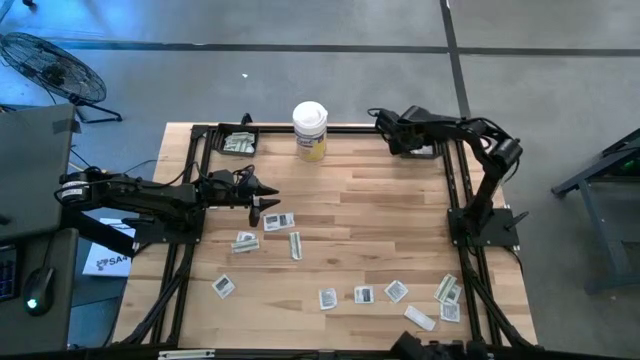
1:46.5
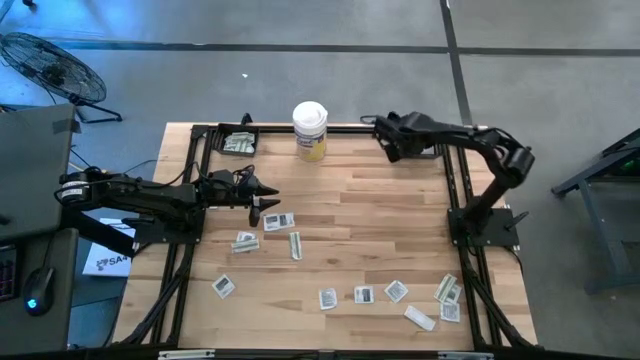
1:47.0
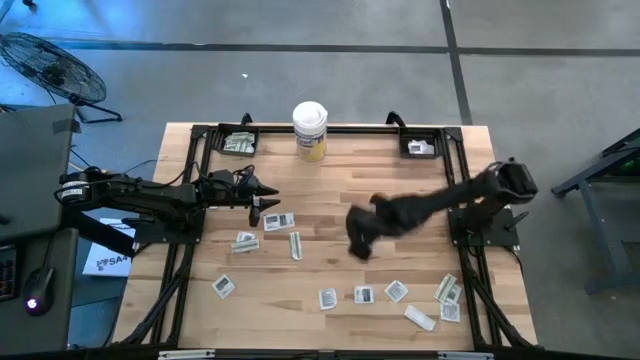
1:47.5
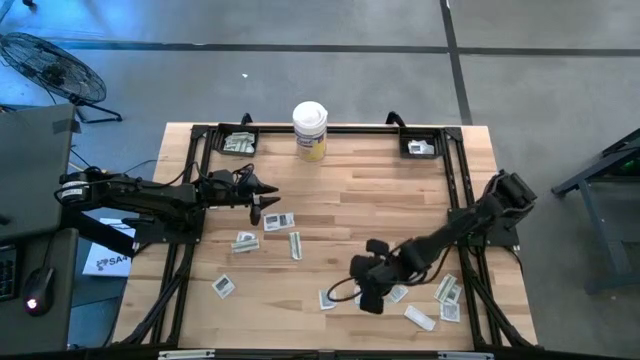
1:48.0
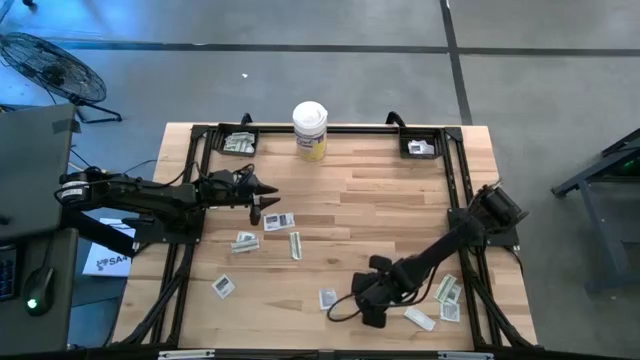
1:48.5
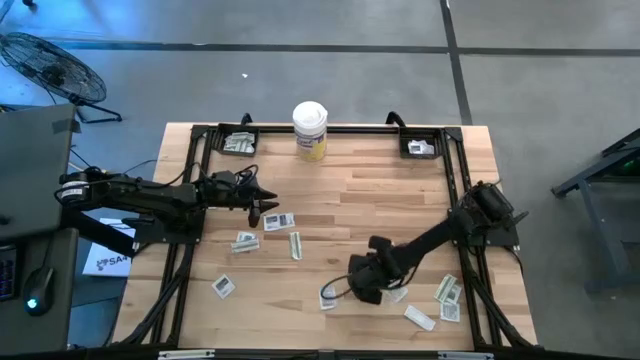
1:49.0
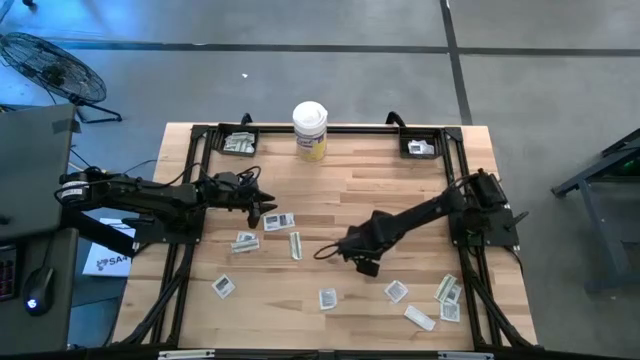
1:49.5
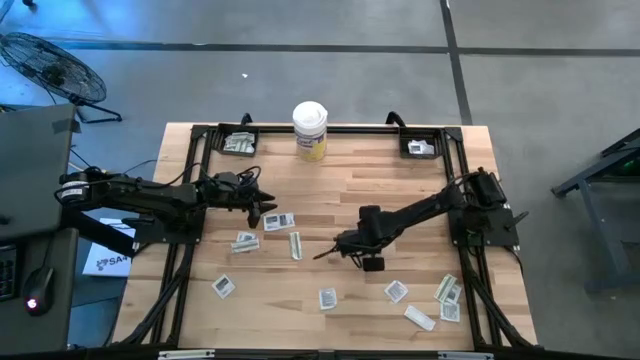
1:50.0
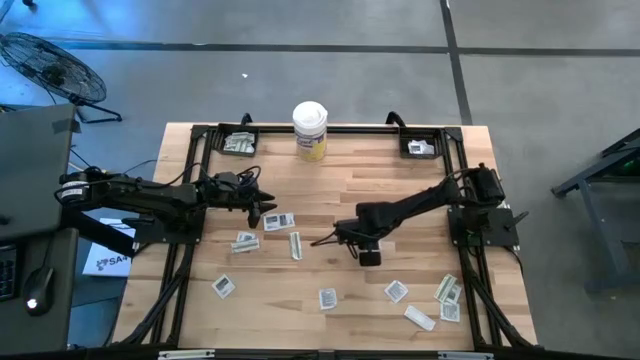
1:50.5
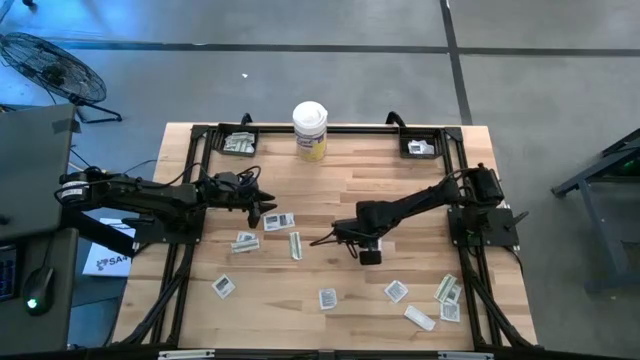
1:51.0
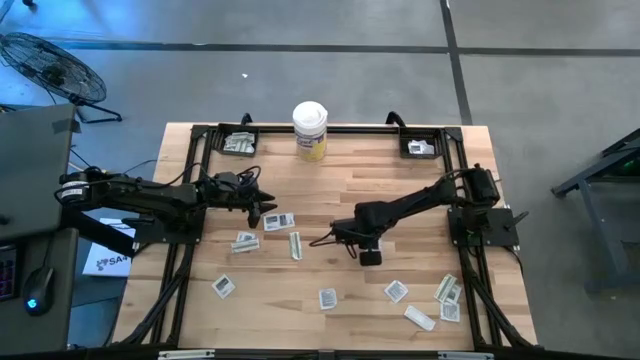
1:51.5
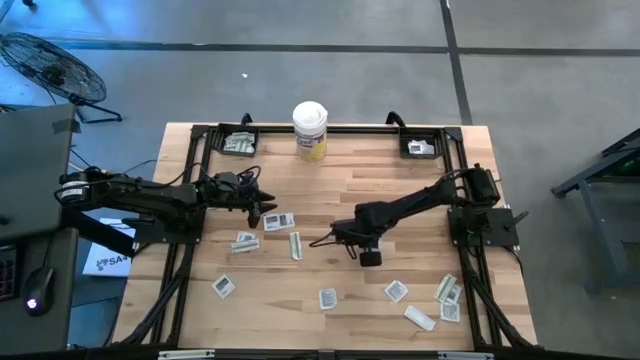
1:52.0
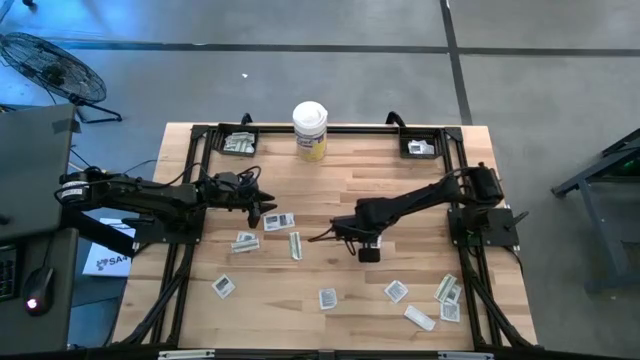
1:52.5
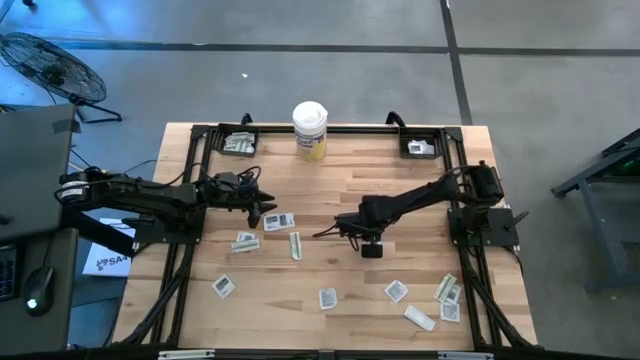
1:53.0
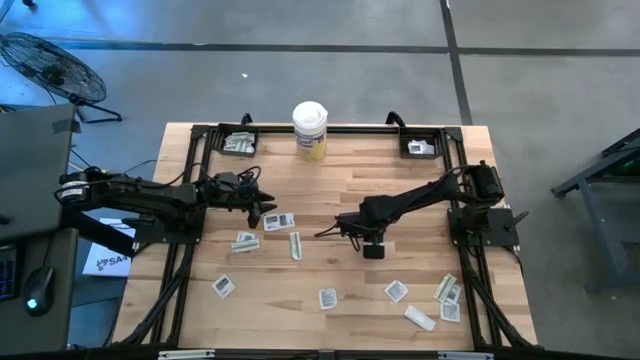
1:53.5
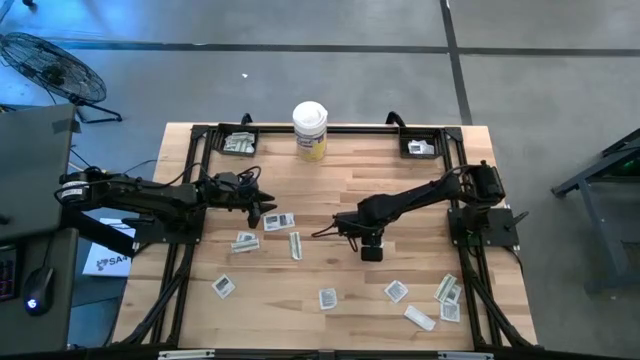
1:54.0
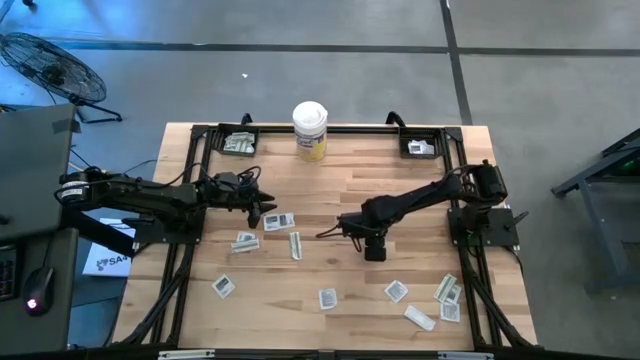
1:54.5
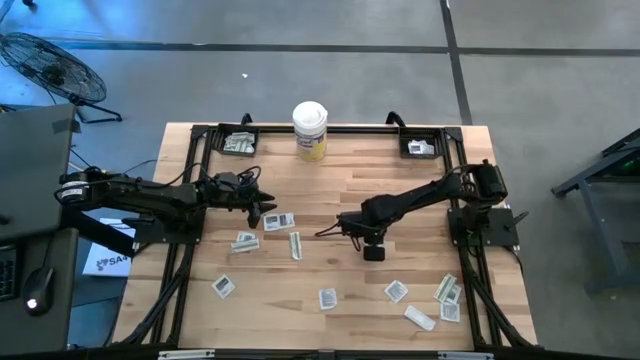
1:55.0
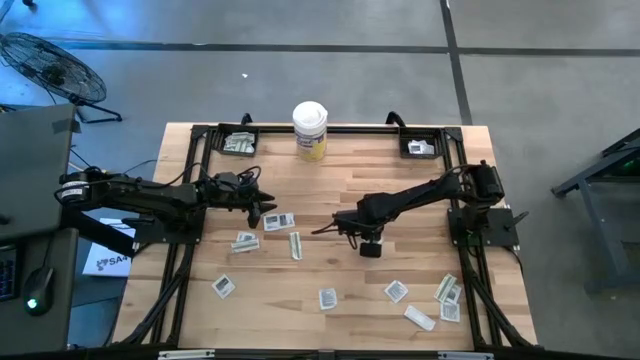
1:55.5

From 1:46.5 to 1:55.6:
Task: Pick & Place First Aid Supplies
Put the black towelette pack into the right black basket

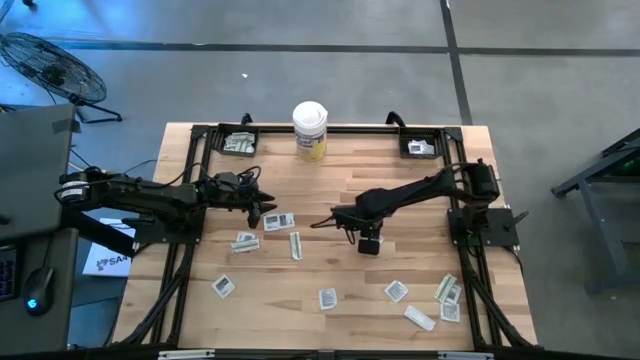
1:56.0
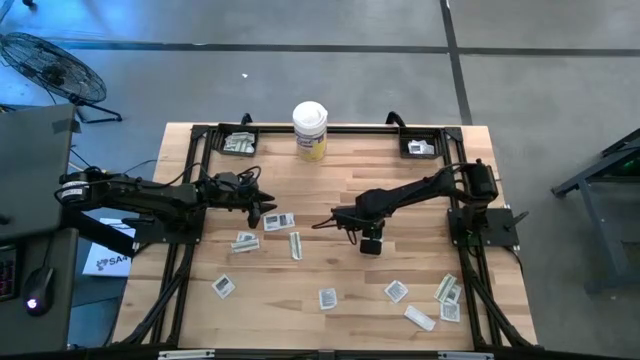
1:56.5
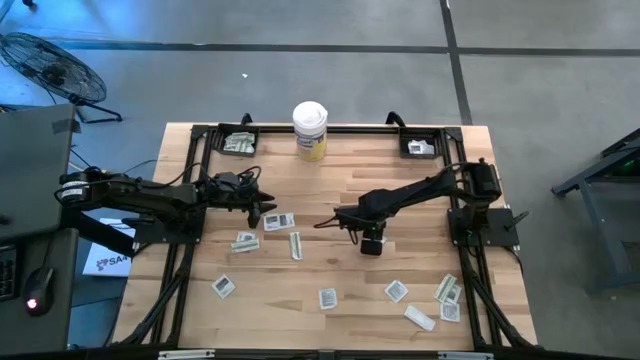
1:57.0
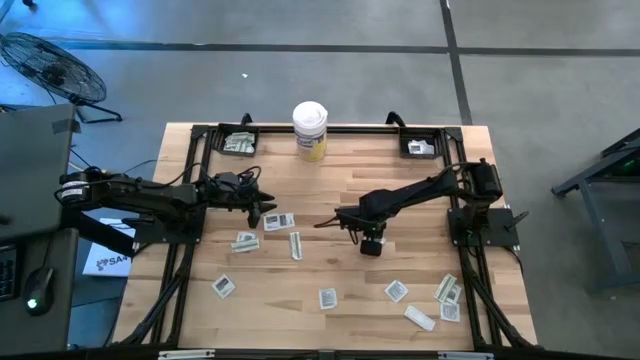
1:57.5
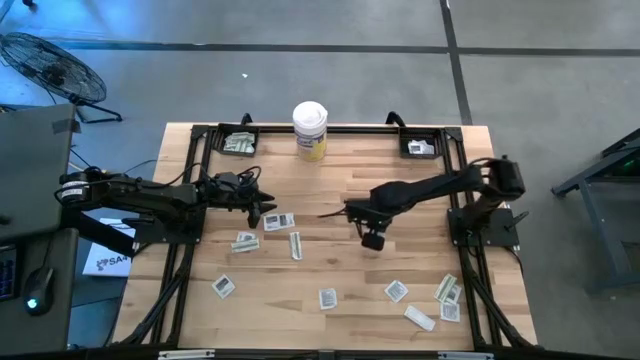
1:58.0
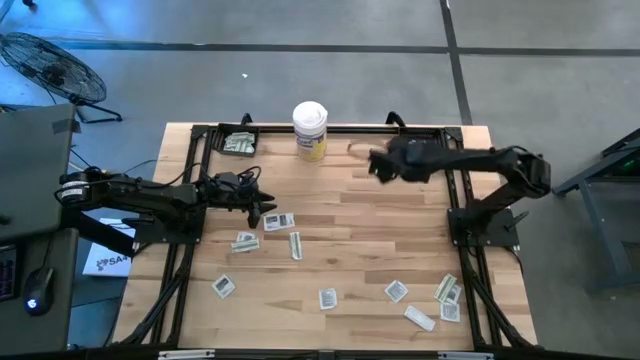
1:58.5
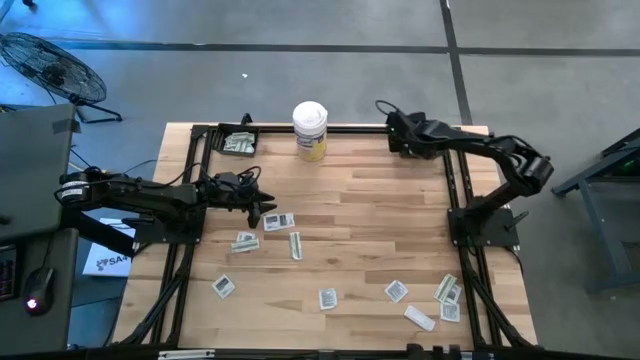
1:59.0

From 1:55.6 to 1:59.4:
Put the black towelette pack into the right black basket

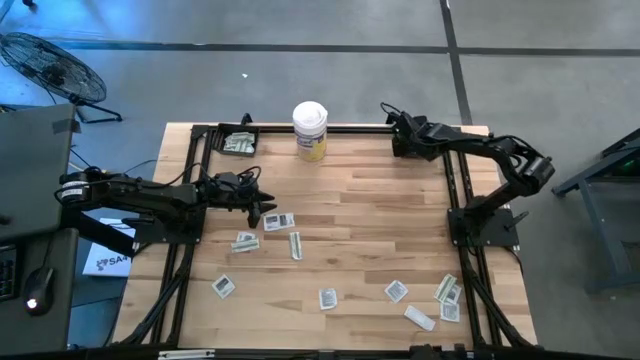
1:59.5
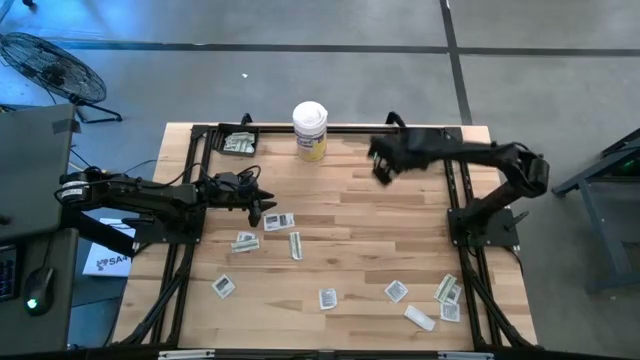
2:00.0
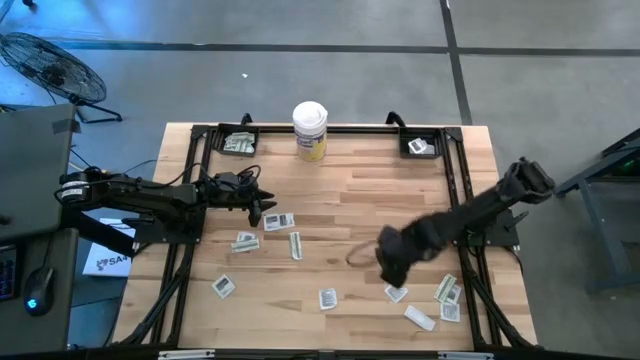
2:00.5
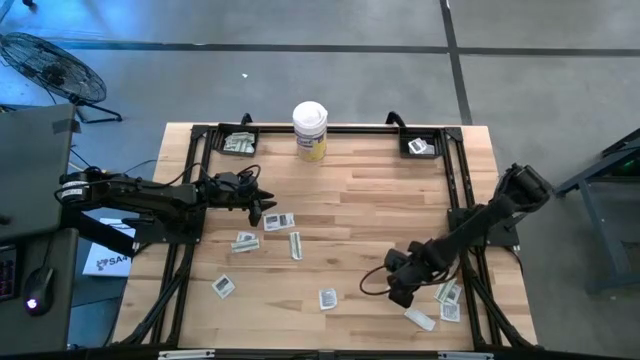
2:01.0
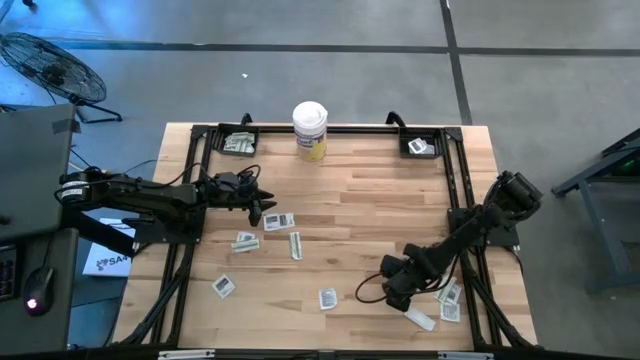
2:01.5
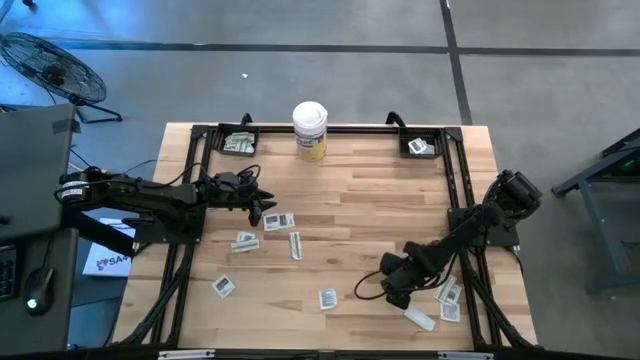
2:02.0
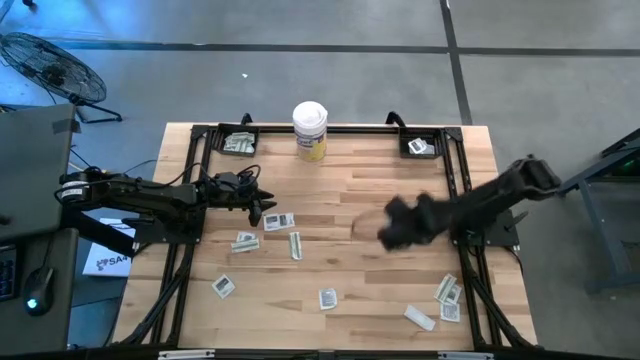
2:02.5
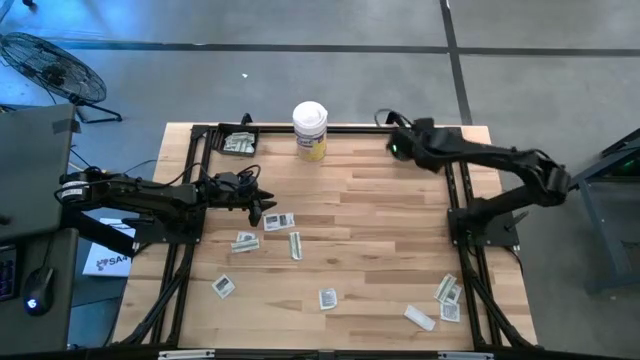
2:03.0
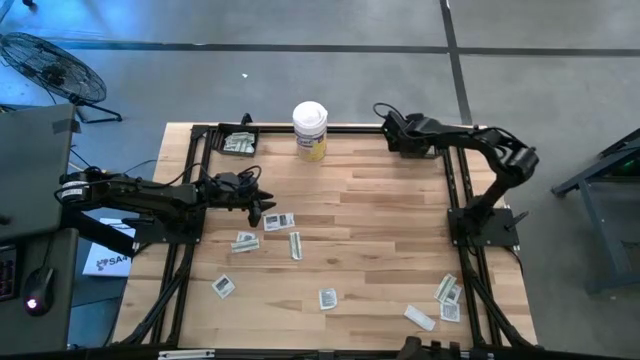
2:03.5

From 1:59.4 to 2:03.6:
Put the black towelette pack into the right black basket

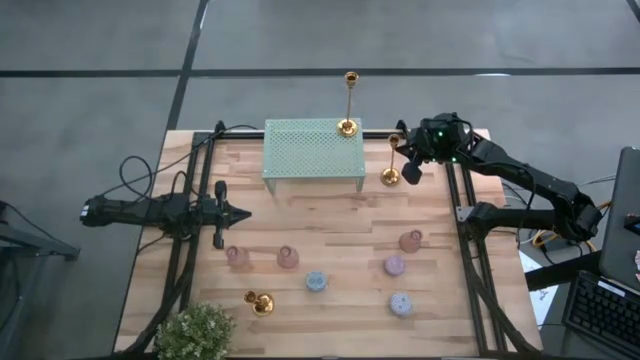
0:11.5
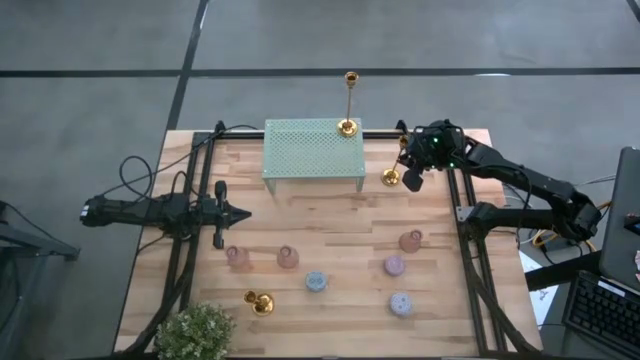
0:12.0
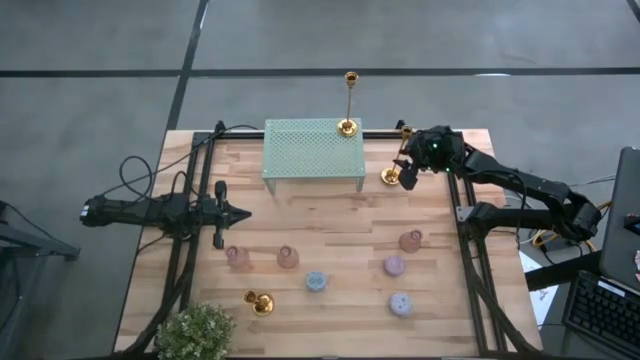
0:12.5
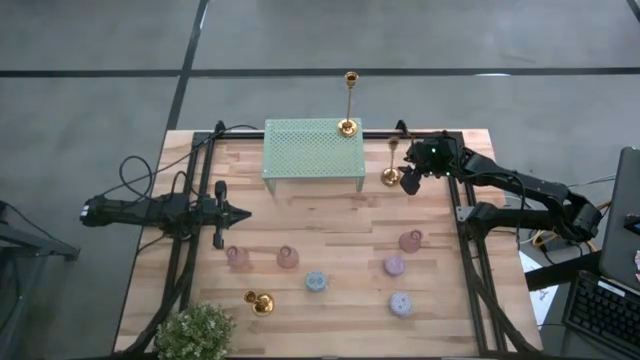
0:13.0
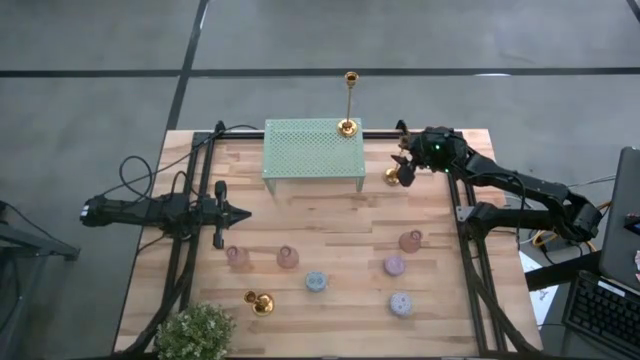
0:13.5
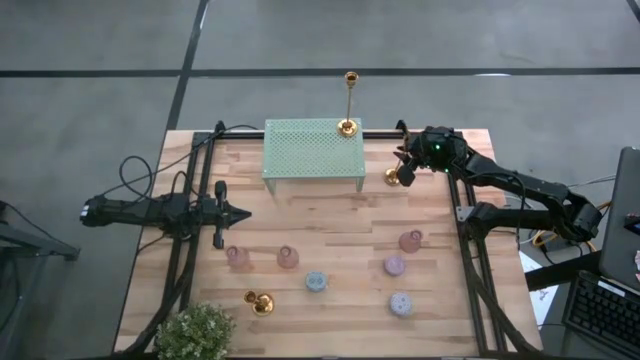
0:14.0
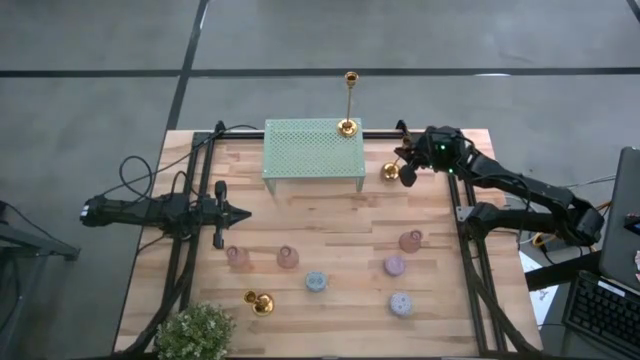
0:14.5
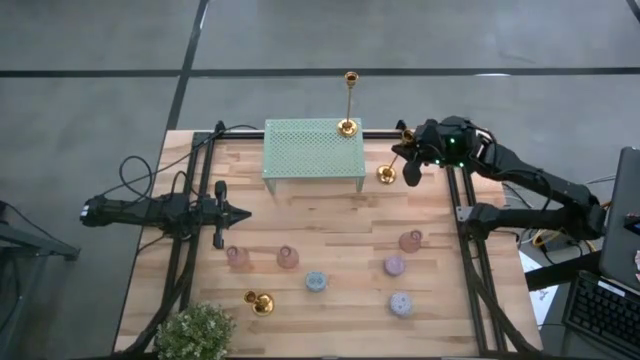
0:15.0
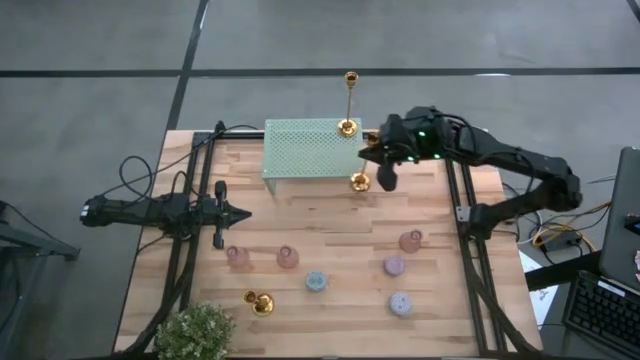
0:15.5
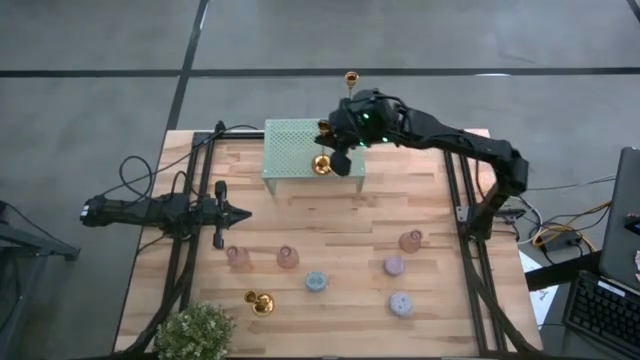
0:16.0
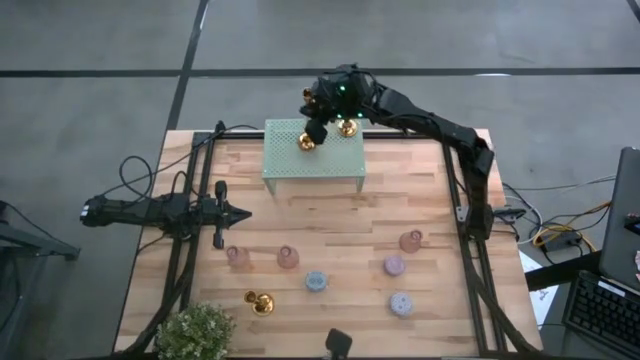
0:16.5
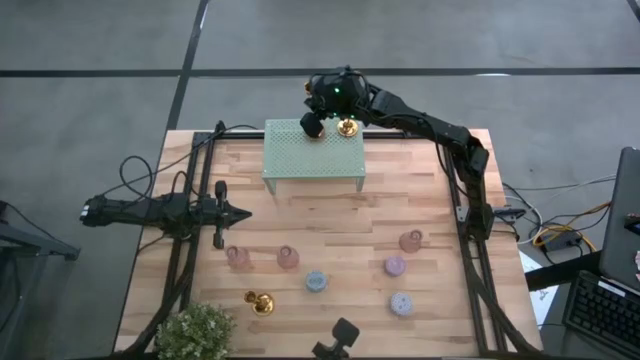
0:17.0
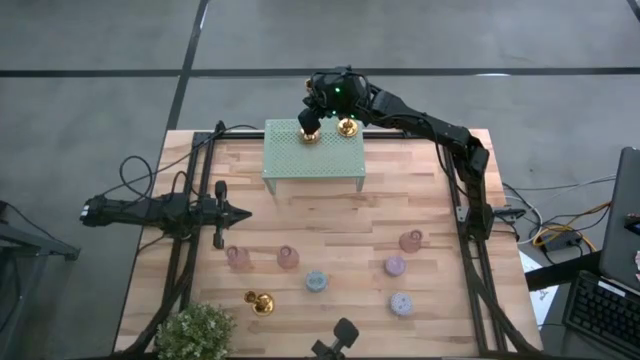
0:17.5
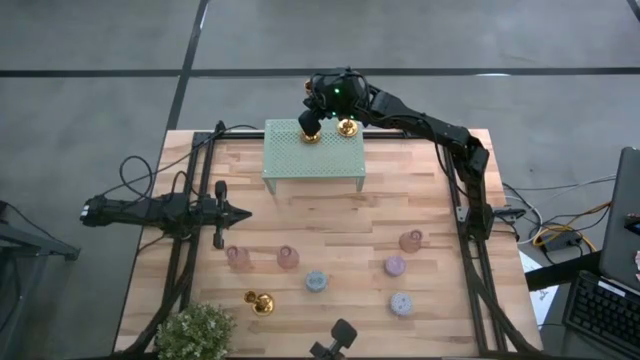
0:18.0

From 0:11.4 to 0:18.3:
Task: Pick & Place candle stick holders
Put the top gold candle holder on the shelf aligned with the other gold candle holder
